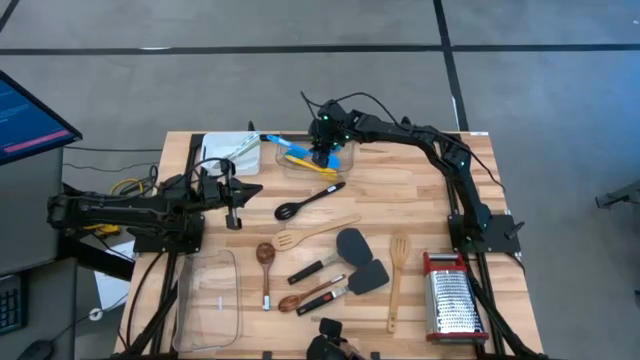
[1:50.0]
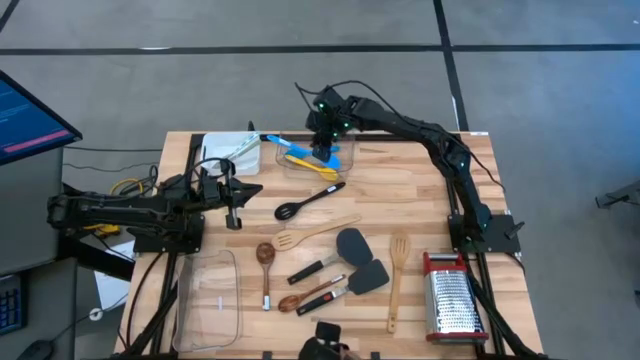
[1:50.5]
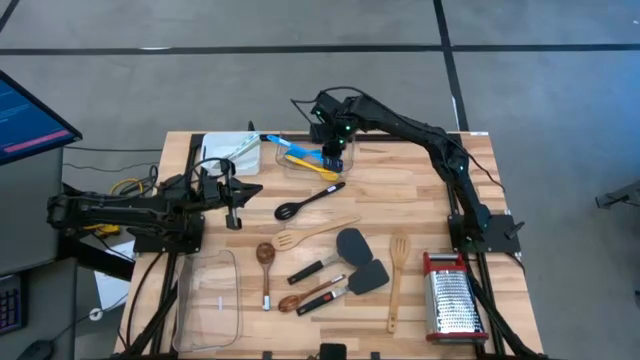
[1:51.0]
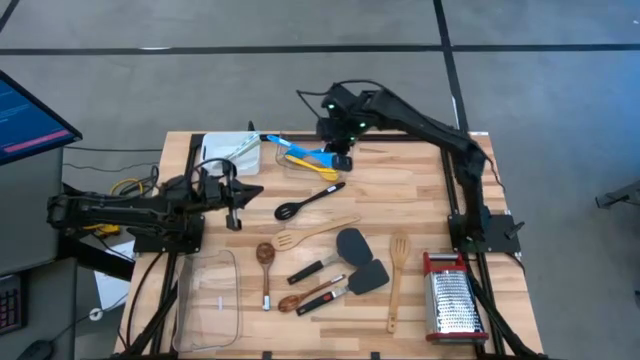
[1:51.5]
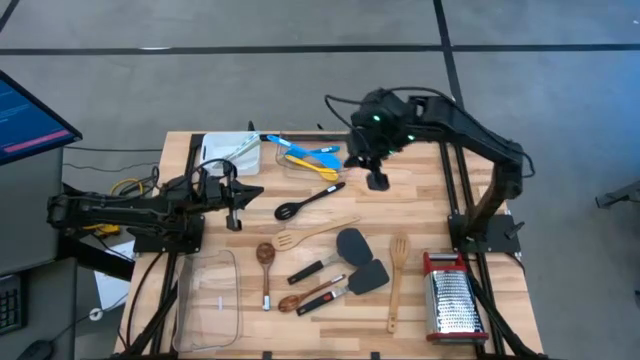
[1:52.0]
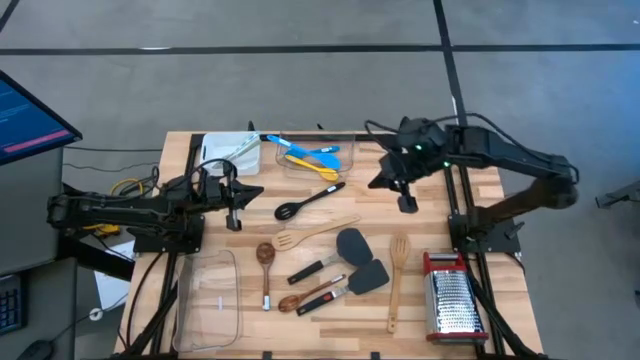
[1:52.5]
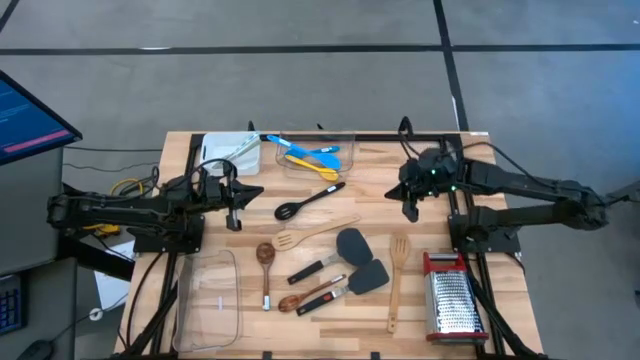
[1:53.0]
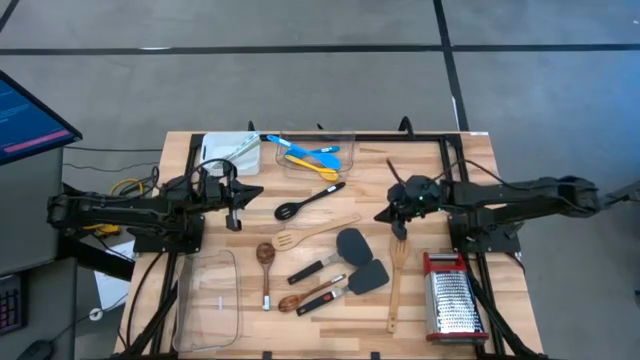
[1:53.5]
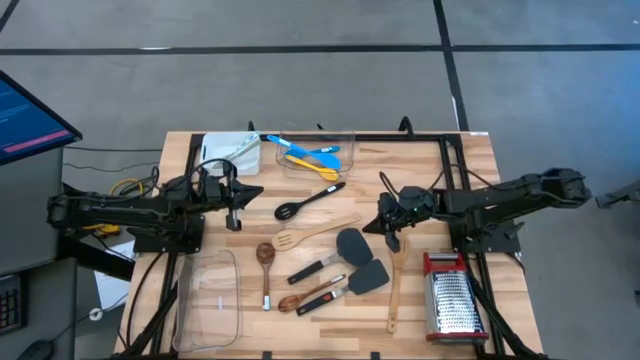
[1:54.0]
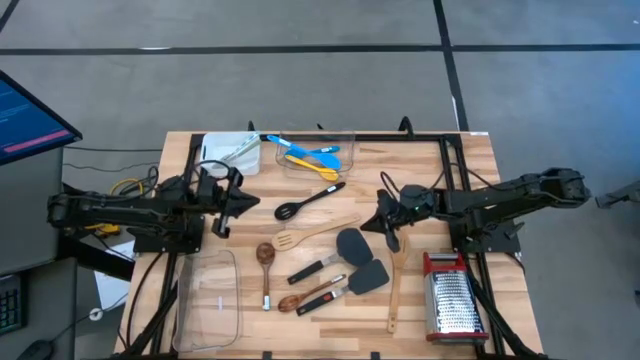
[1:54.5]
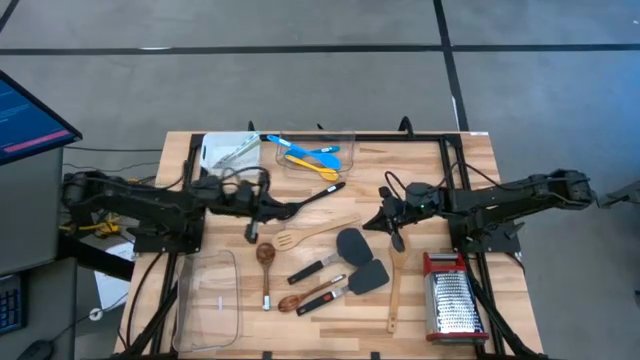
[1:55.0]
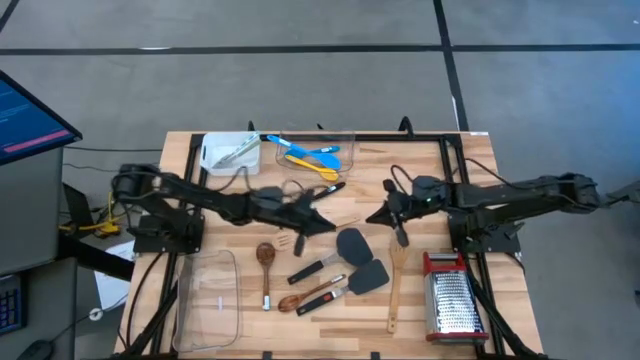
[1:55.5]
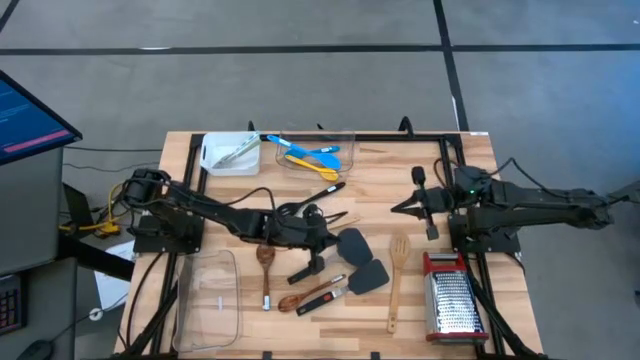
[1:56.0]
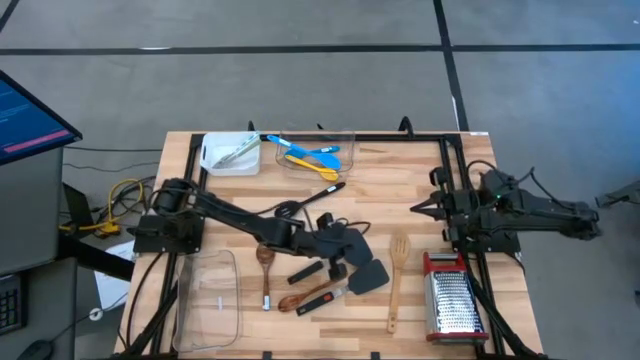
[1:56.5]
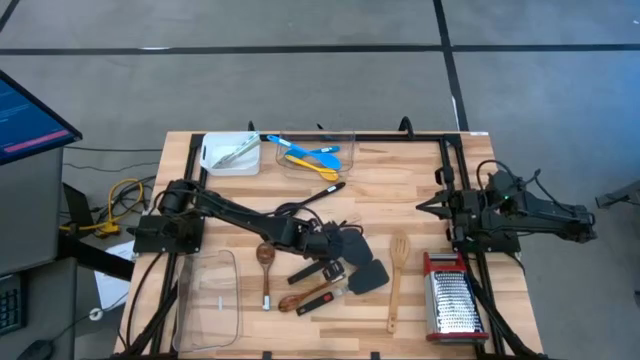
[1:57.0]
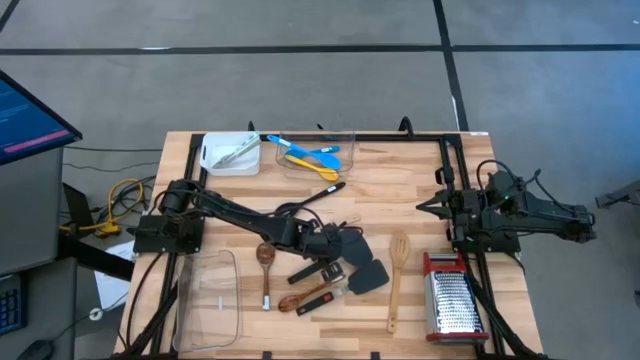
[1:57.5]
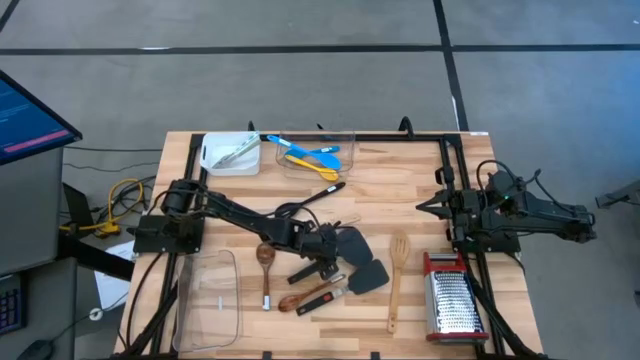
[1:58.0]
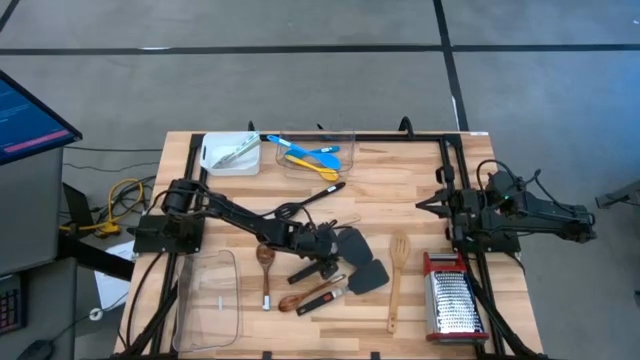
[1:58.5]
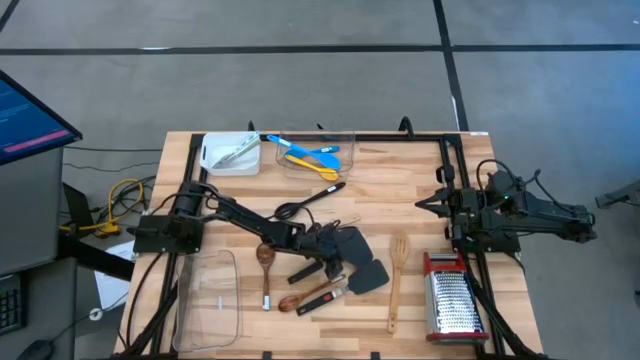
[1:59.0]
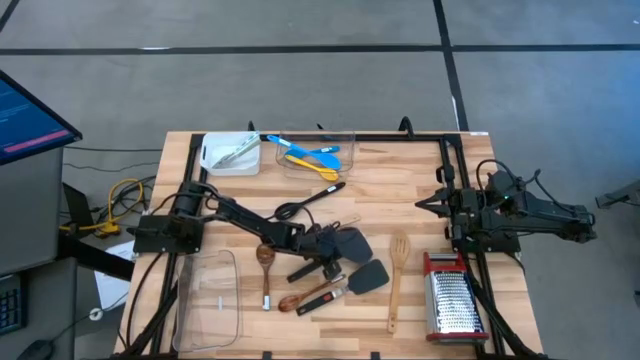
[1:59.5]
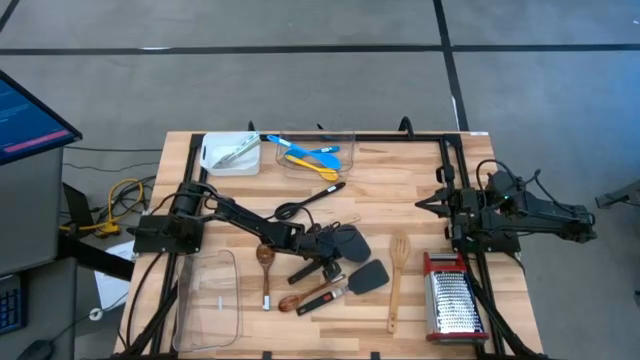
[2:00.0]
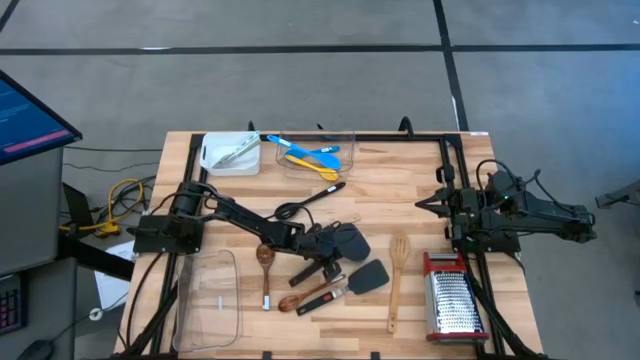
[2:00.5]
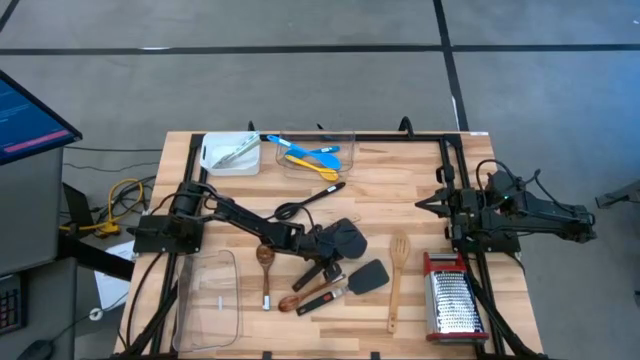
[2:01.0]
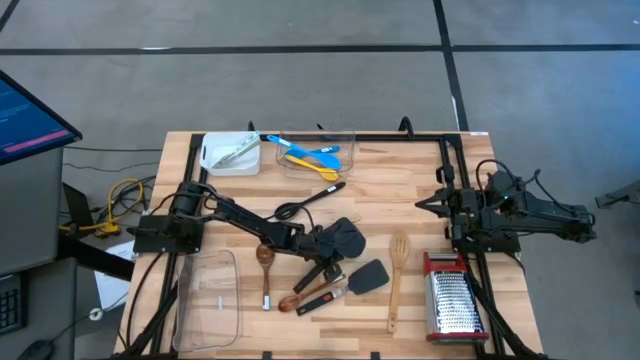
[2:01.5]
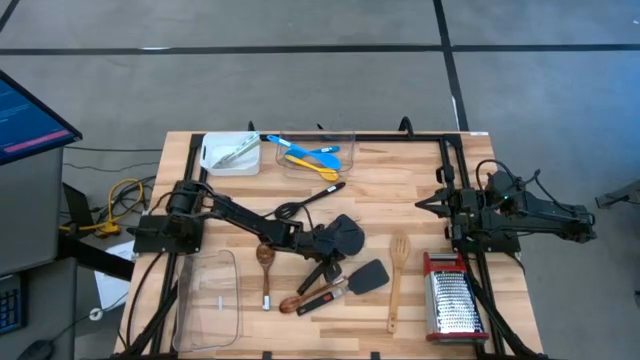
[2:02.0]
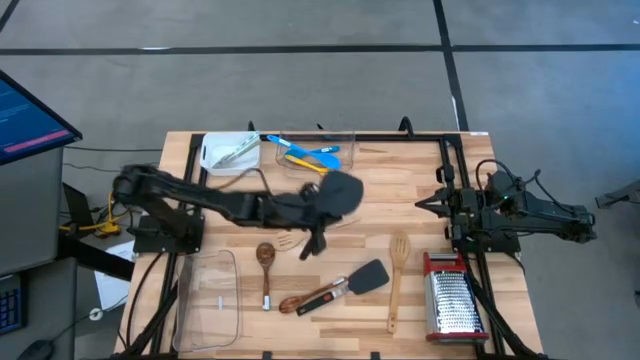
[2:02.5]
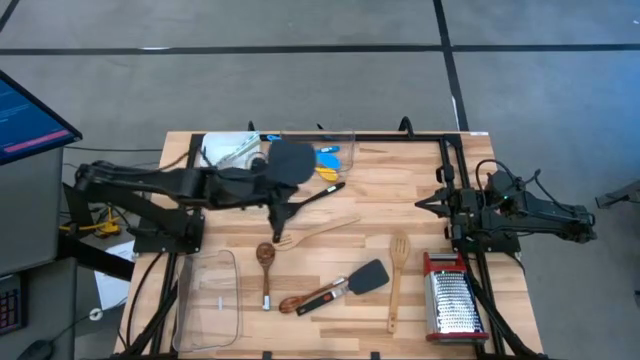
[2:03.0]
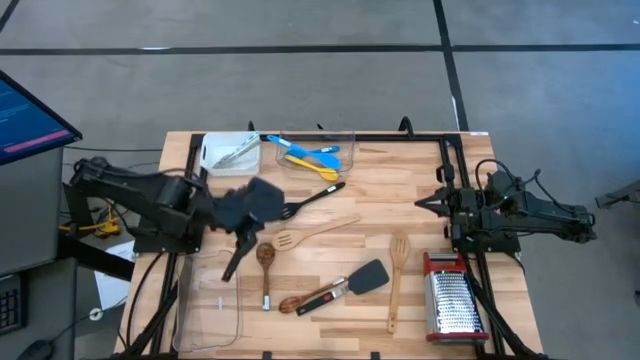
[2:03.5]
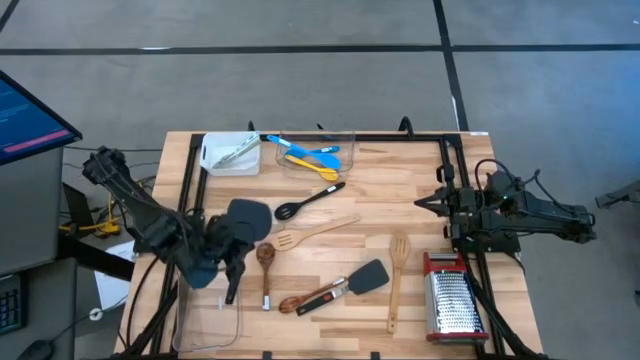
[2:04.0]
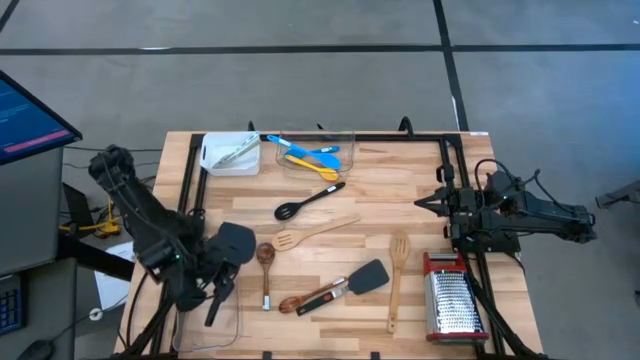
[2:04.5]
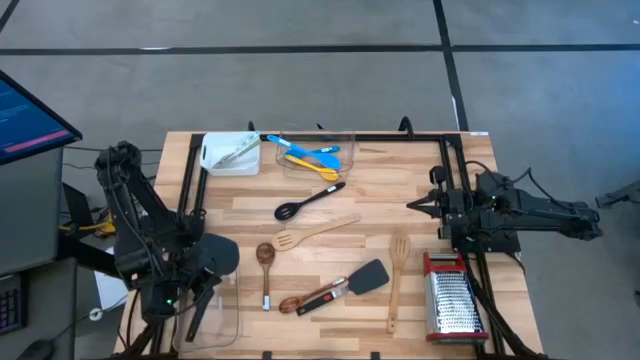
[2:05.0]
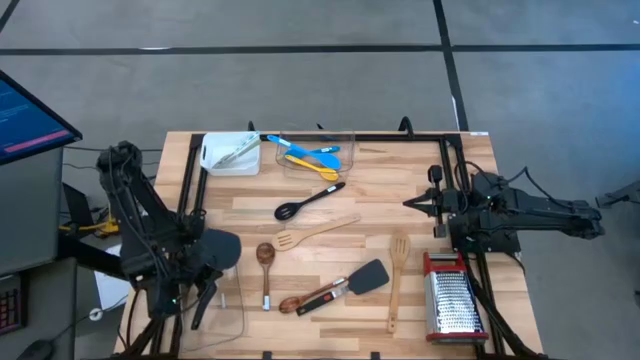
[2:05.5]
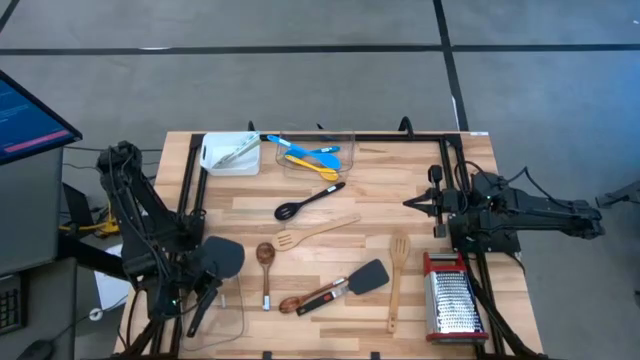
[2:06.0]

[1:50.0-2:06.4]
Task: Pick & Place Kitchen Items
Put the black slotted spatula into the bottom transparent bin

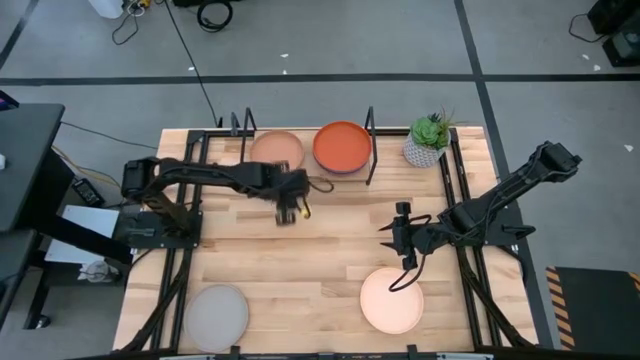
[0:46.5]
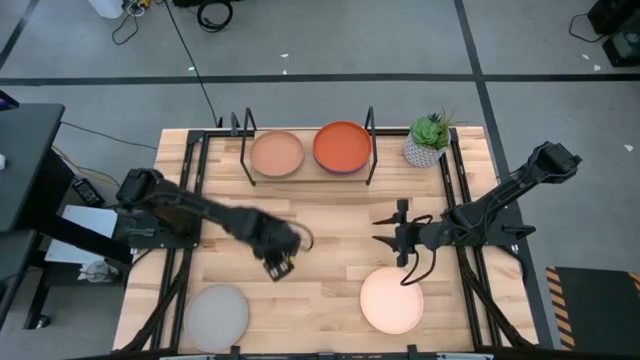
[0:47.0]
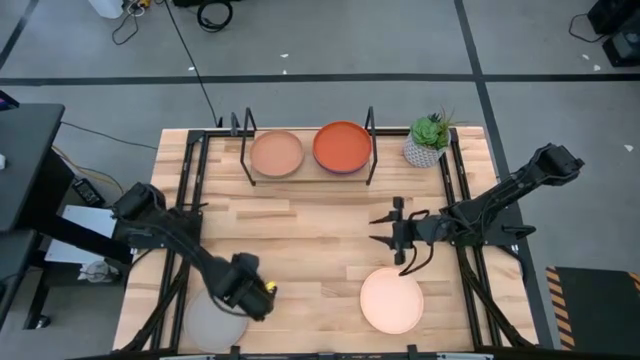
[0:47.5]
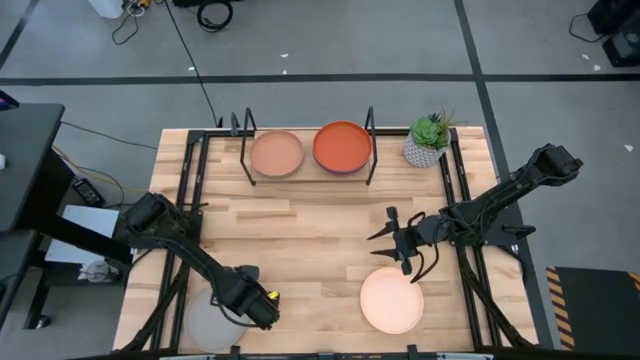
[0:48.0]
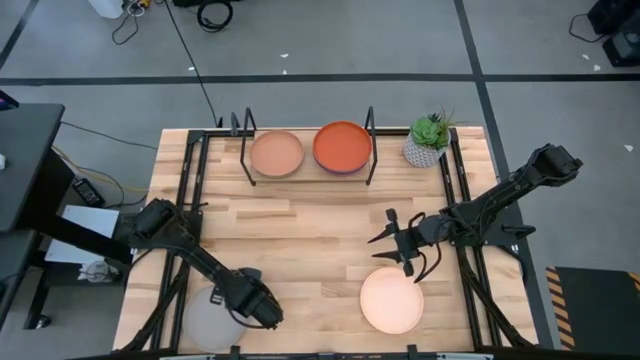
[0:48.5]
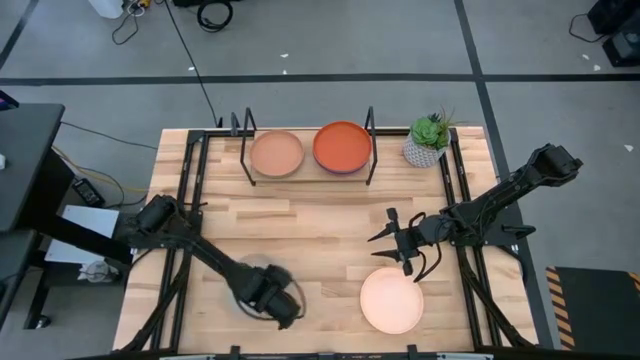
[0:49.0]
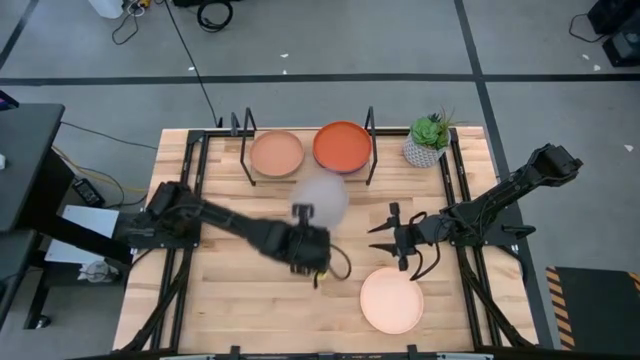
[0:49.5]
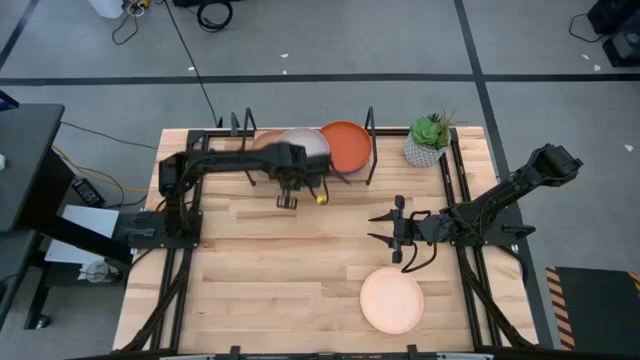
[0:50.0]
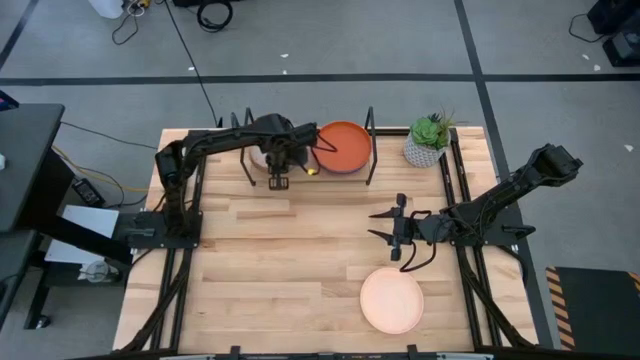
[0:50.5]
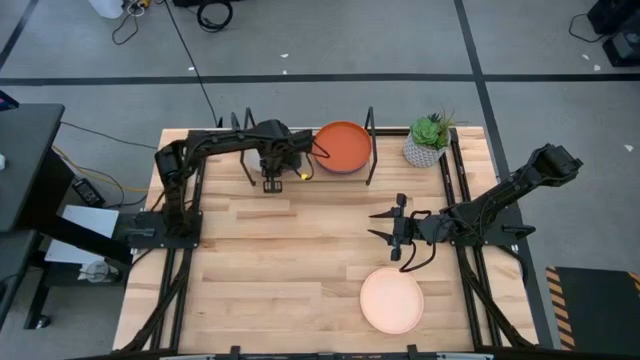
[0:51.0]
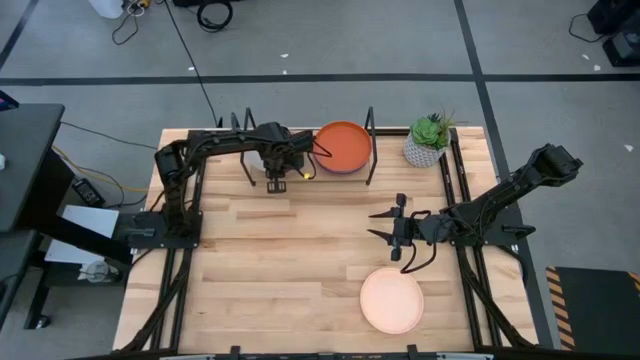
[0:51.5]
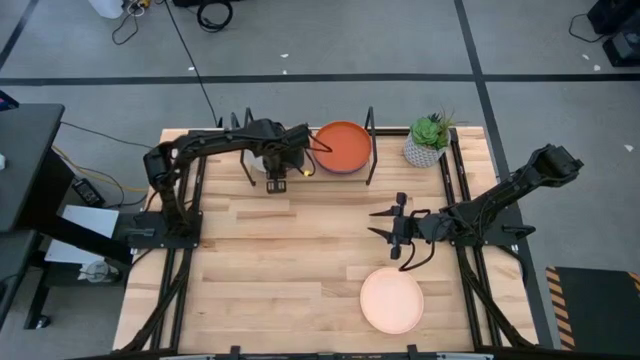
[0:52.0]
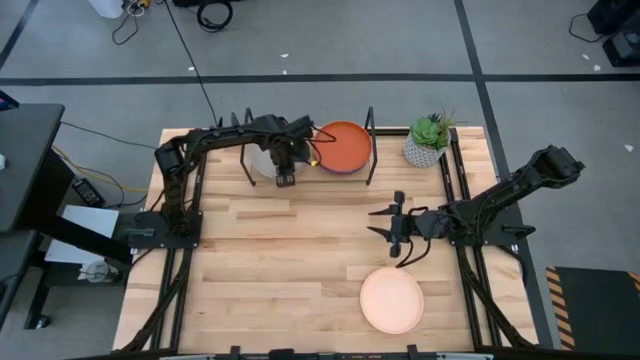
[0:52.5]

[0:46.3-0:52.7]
Task: Place and stack plates onto a shelf
Stack the gray plate on top of the brown plate on the shelf
